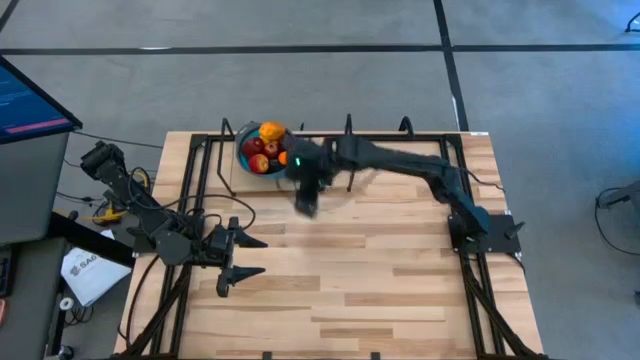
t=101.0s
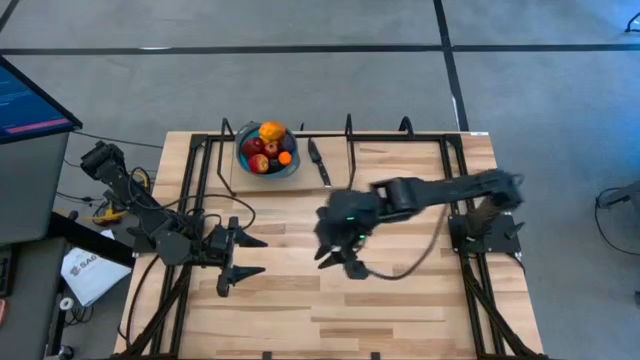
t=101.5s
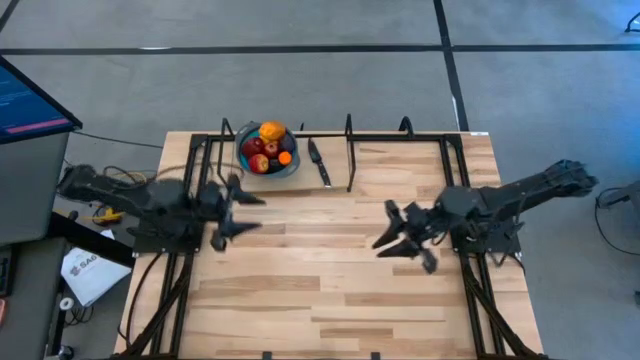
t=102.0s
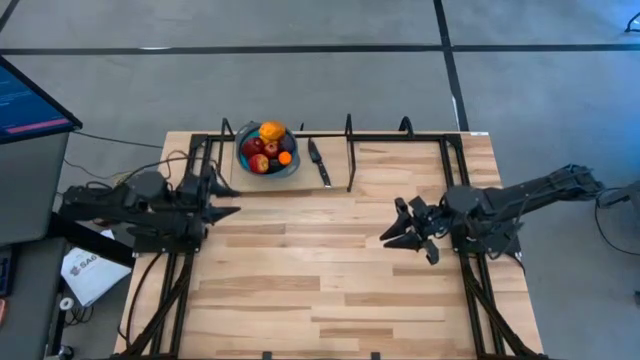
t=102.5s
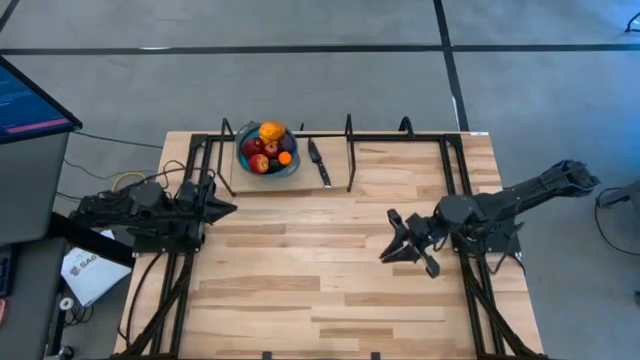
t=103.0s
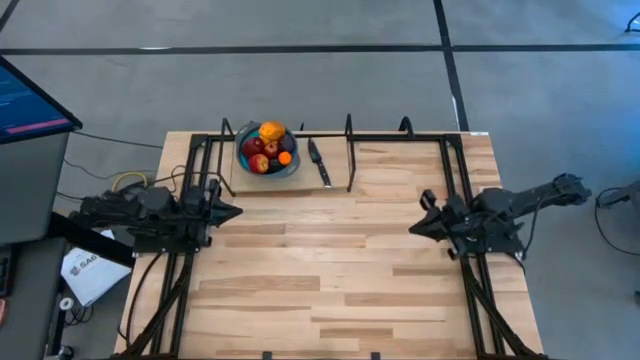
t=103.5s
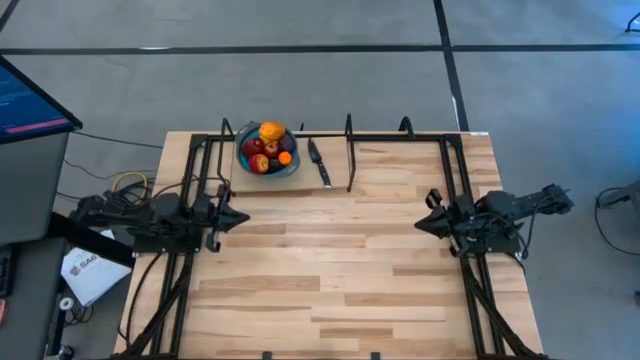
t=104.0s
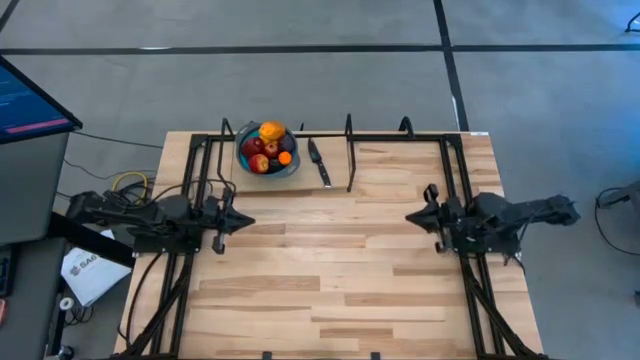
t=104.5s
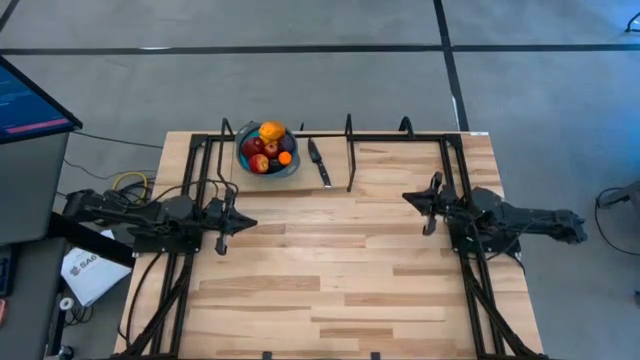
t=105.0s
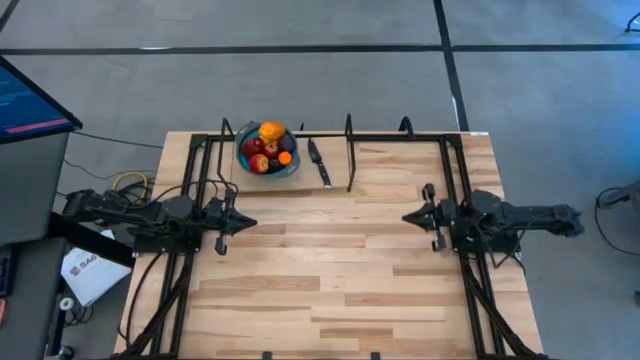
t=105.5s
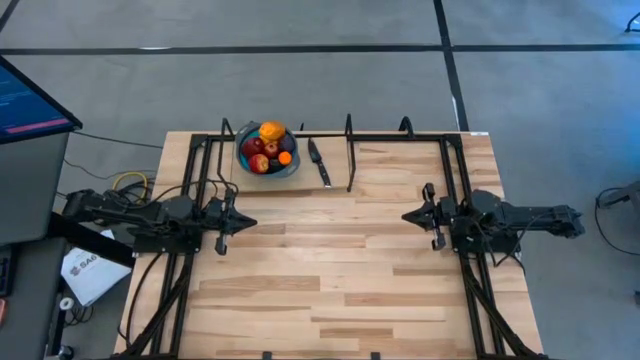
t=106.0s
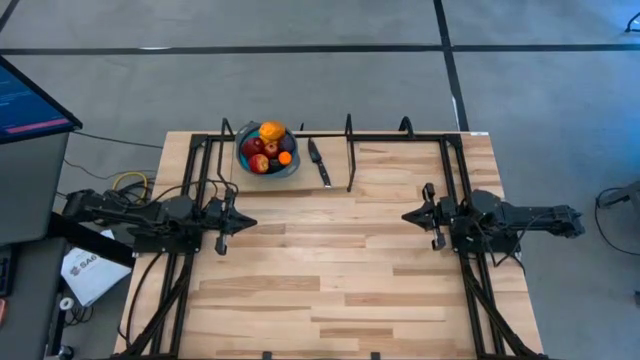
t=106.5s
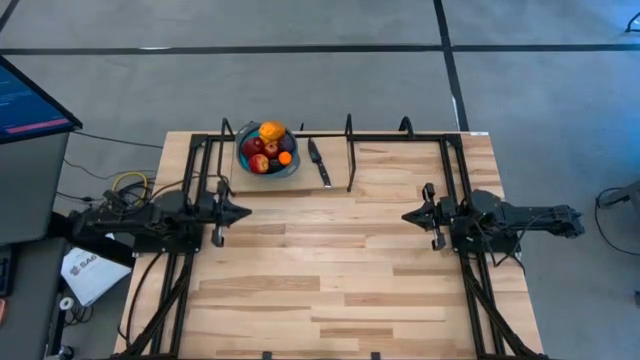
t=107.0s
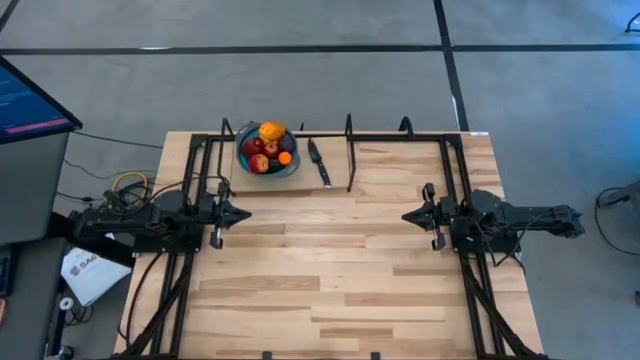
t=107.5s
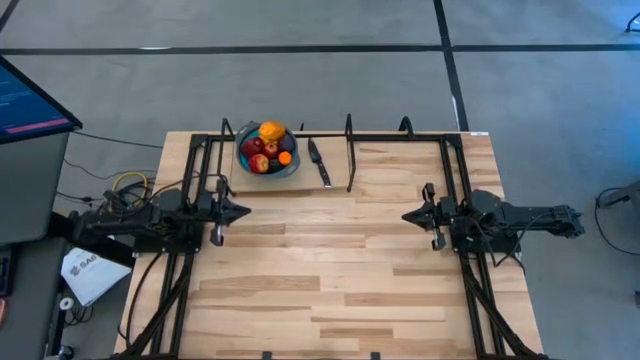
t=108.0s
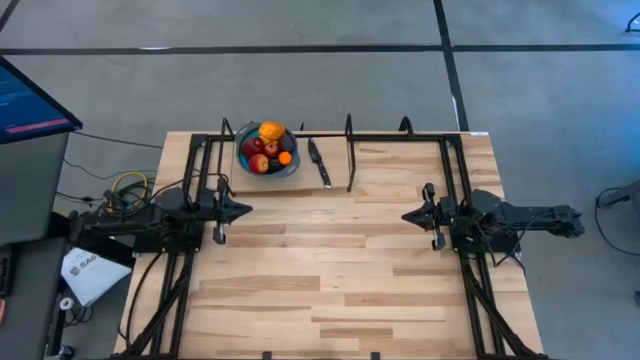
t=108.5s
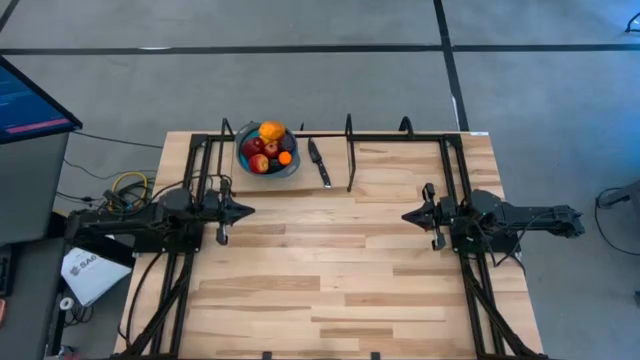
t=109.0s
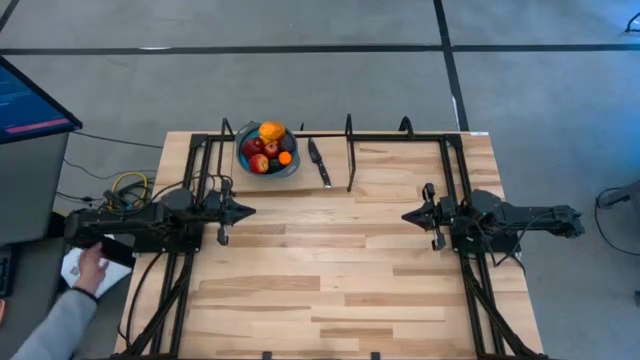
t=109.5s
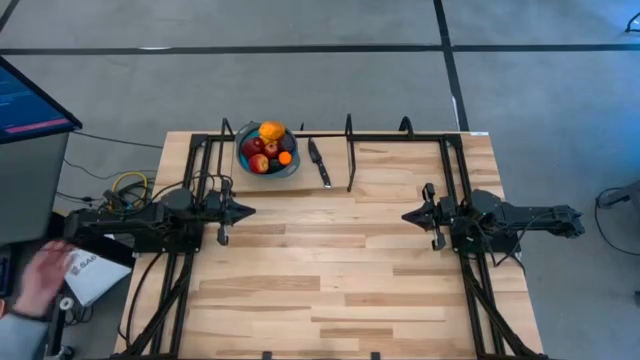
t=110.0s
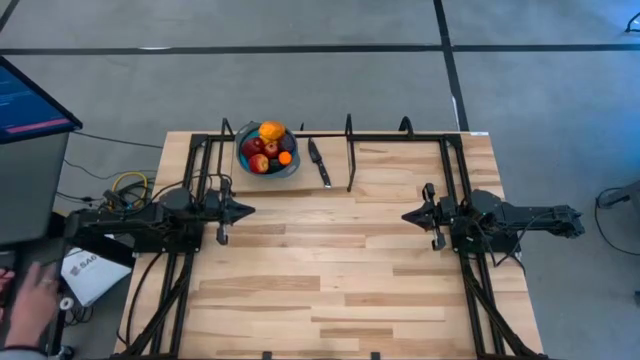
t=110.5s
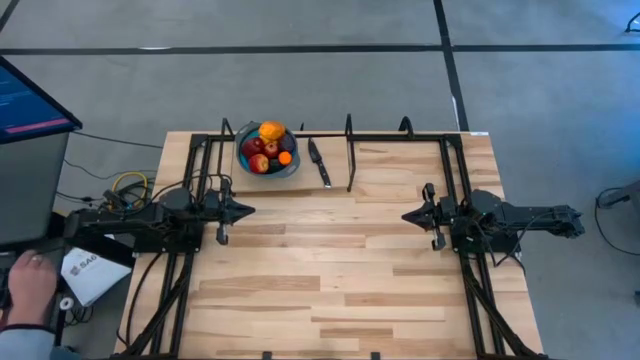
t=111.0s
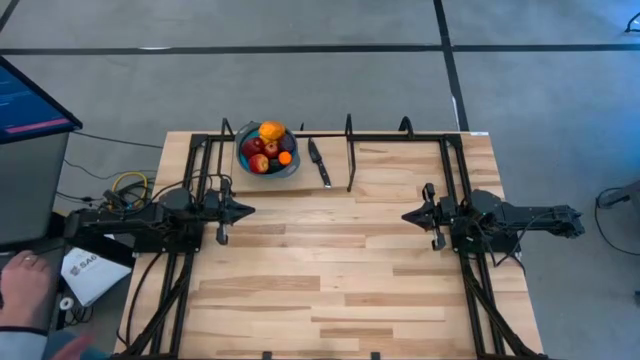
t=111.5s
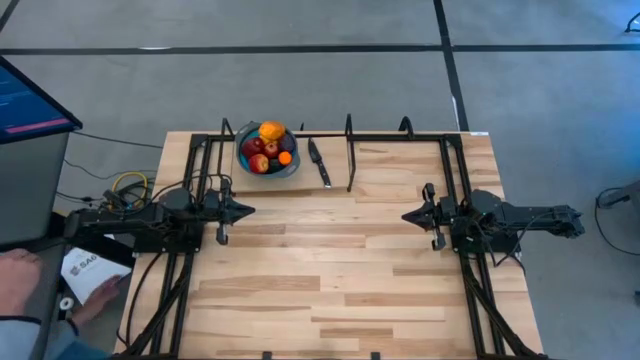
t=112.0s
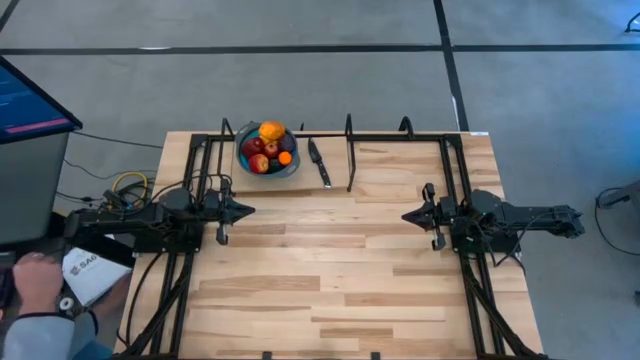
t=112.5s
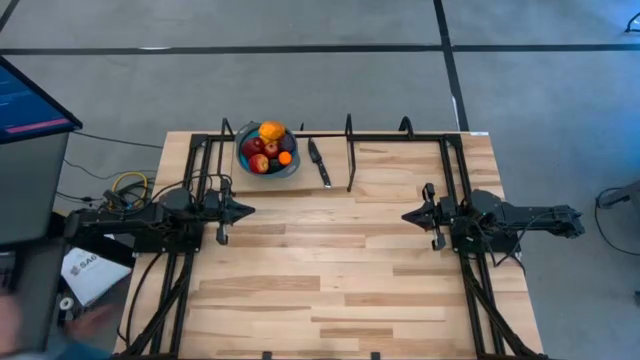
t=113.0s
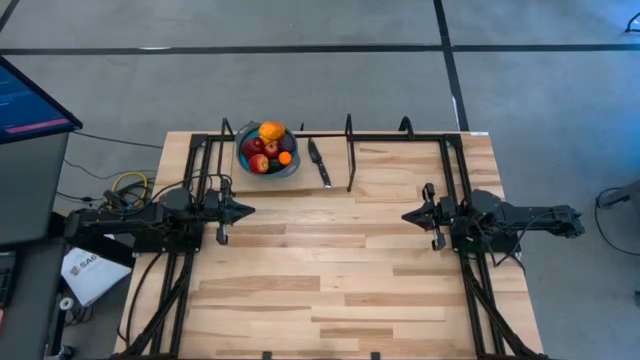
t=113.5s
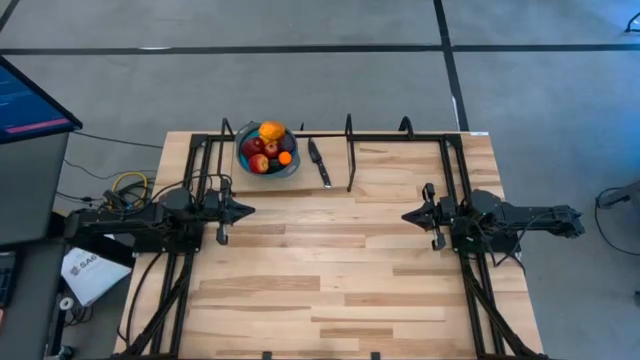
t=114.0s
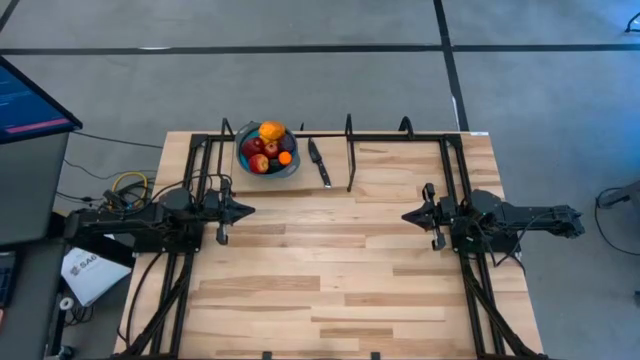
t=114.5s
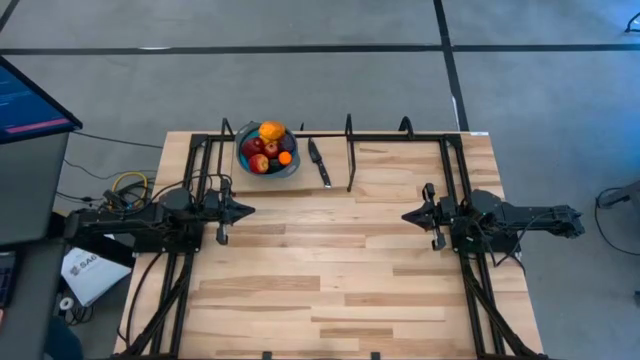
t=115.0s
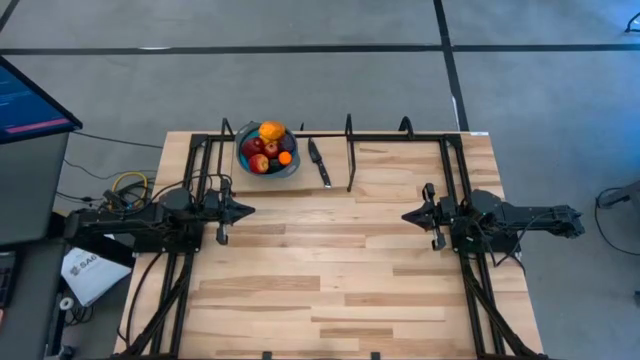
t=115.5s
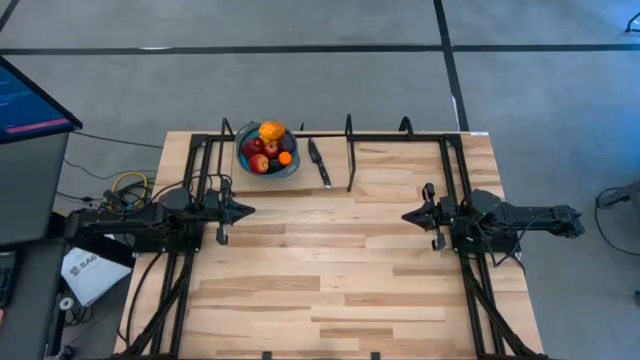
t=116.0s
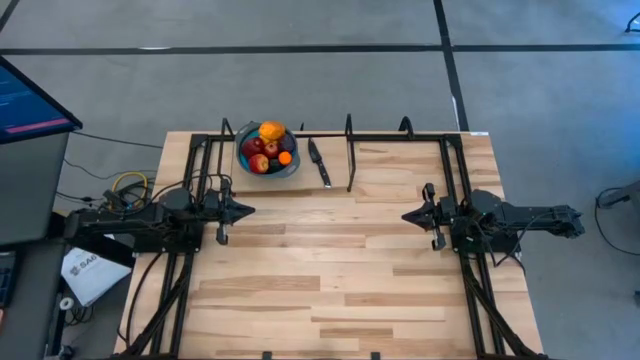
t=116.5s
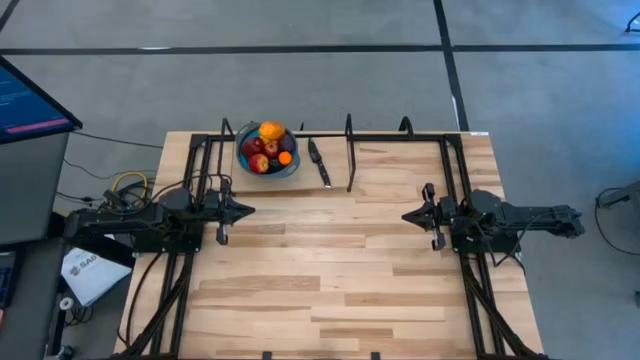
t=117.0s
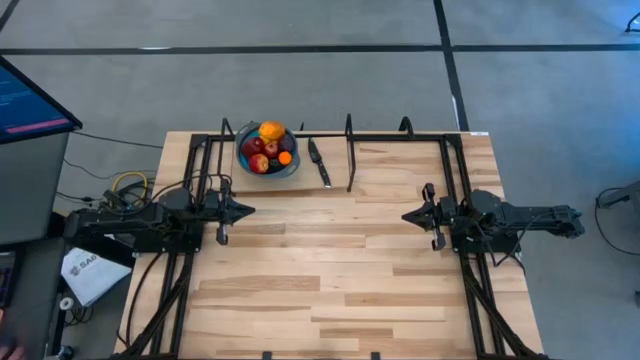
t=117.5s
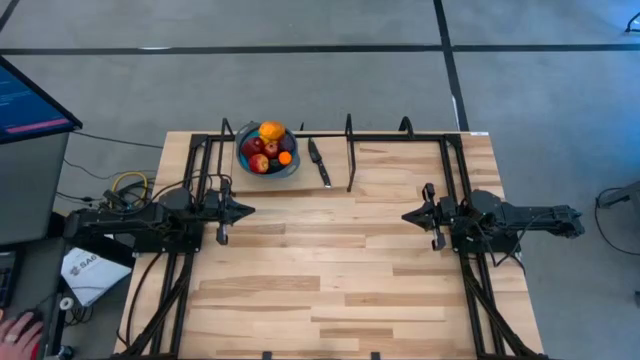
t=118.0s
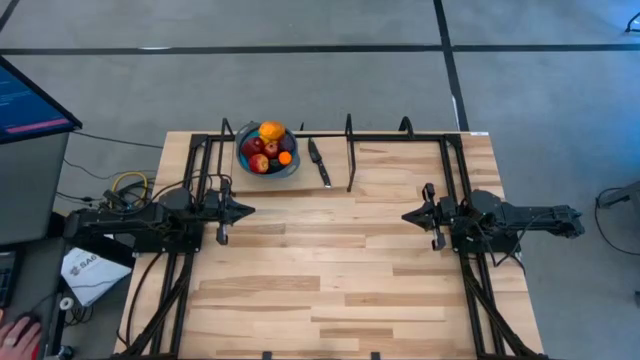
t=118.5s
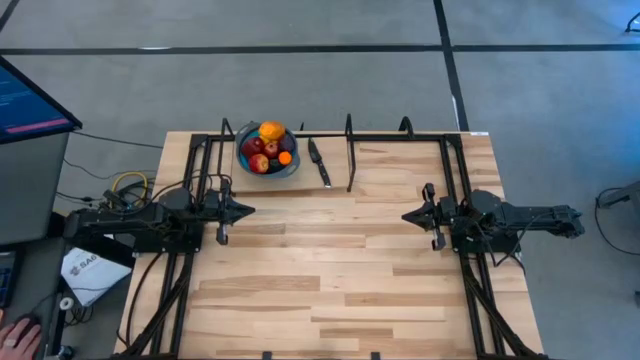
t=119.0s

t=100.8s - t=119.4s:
Task: Pick & Place Fruit
Return to Home Position

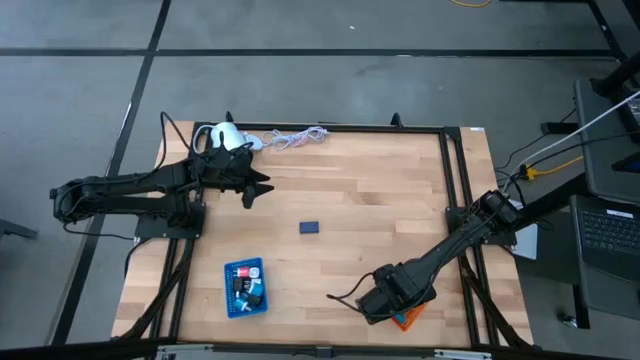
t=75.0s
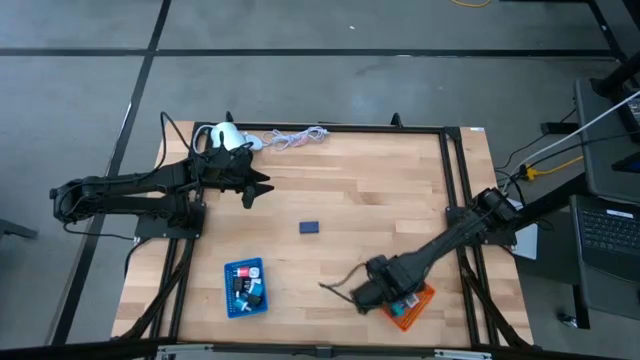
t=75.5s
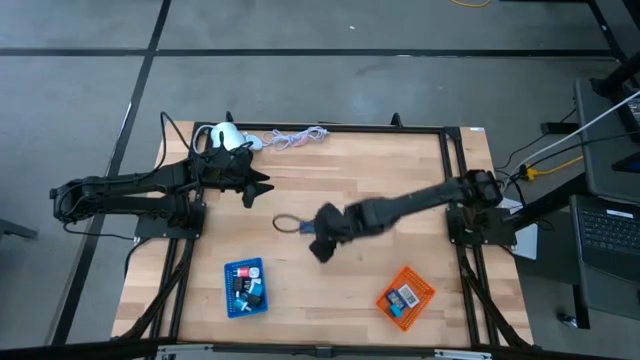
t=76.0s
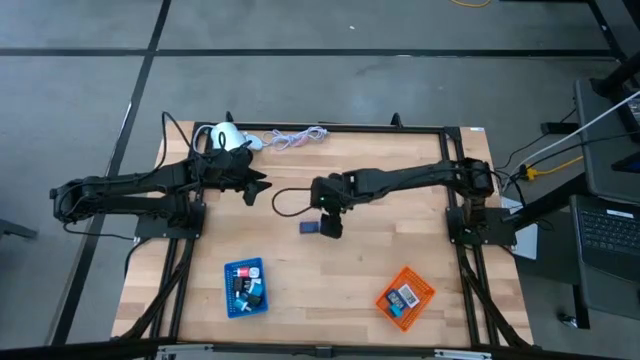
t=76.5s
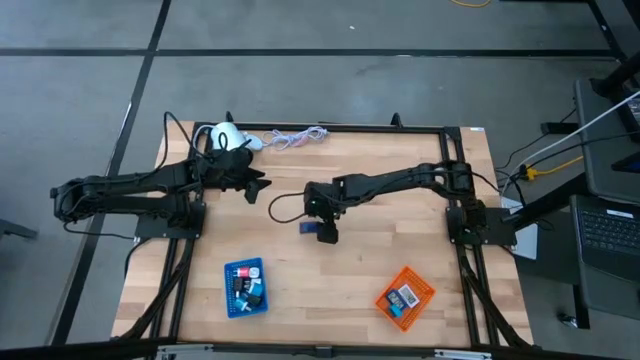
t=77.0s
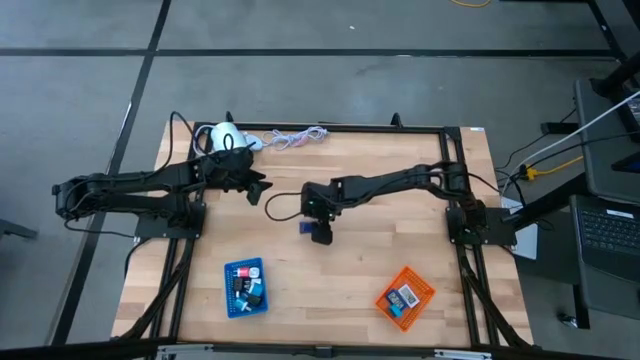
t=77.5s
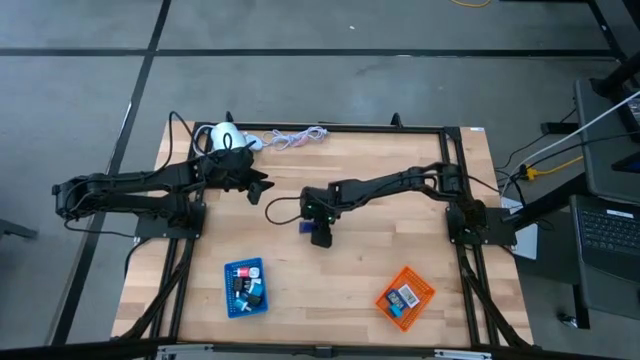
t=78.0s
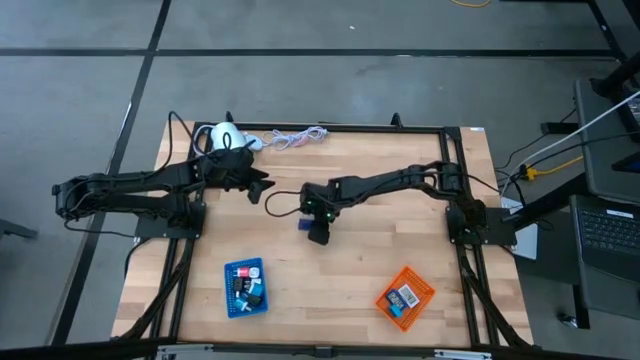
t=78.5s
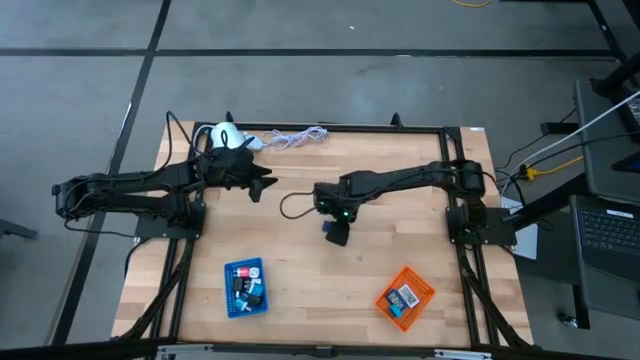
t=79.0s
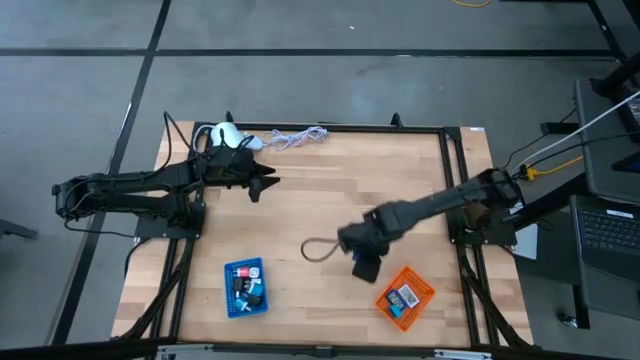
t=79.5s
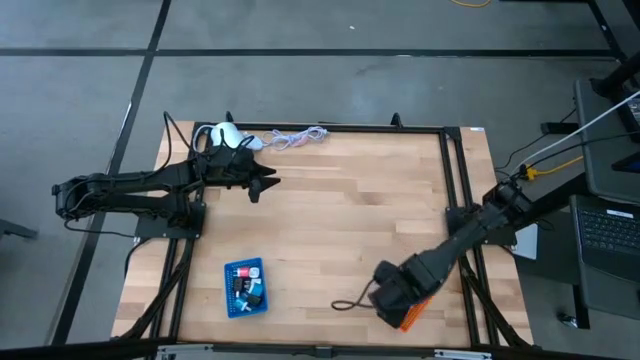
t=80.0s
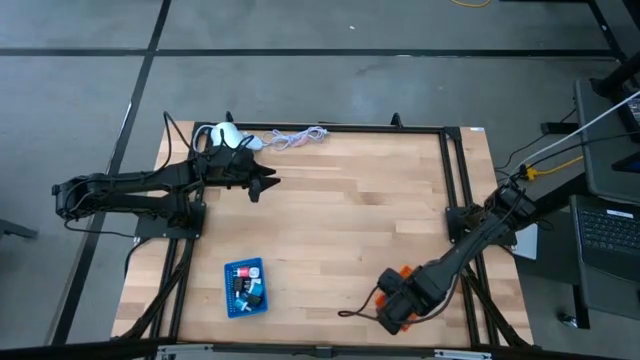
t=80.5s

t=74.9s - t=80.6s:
Task: Pick & Place Office items
Put the blue digital clock into the orange basket
